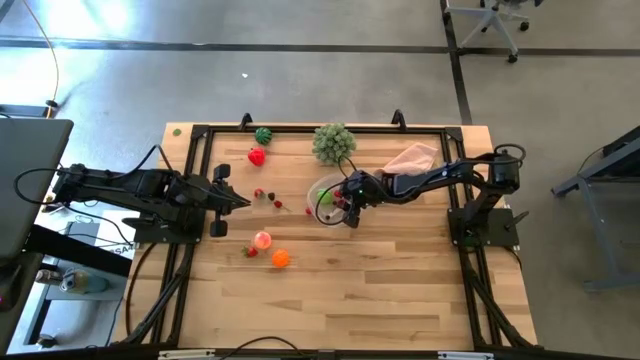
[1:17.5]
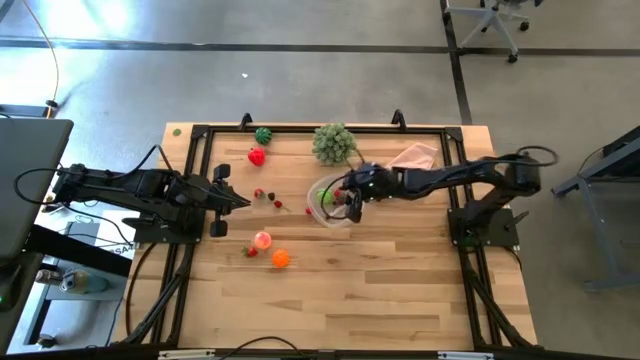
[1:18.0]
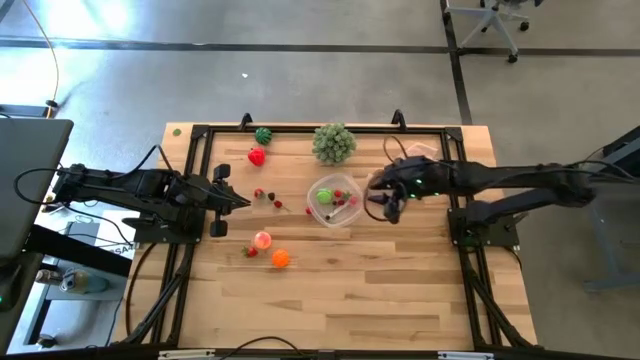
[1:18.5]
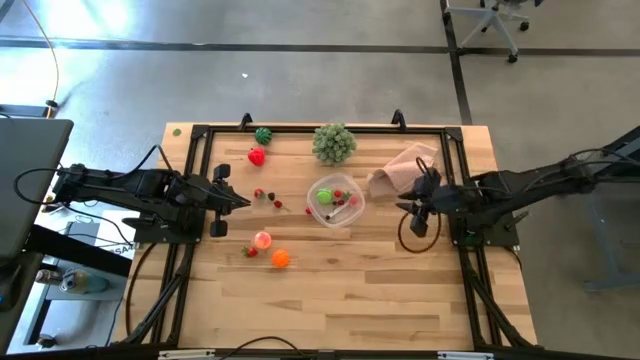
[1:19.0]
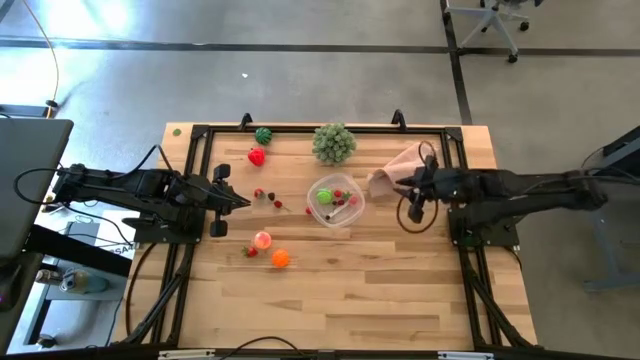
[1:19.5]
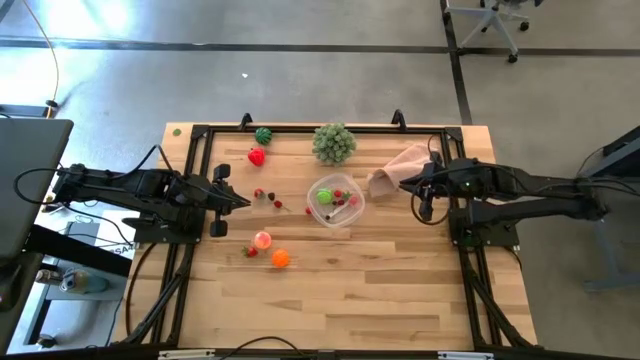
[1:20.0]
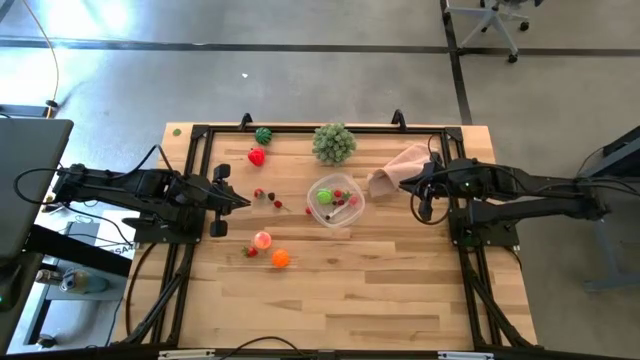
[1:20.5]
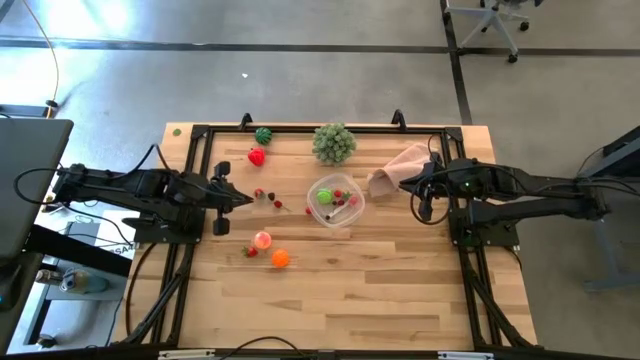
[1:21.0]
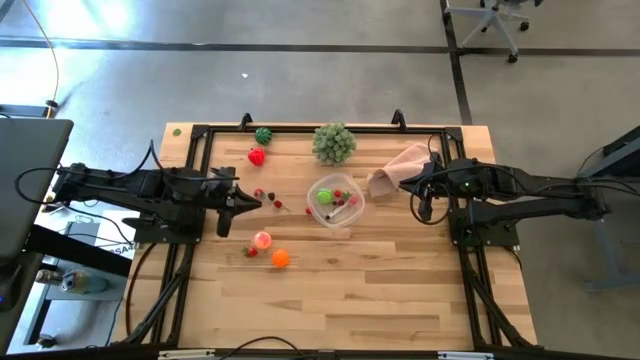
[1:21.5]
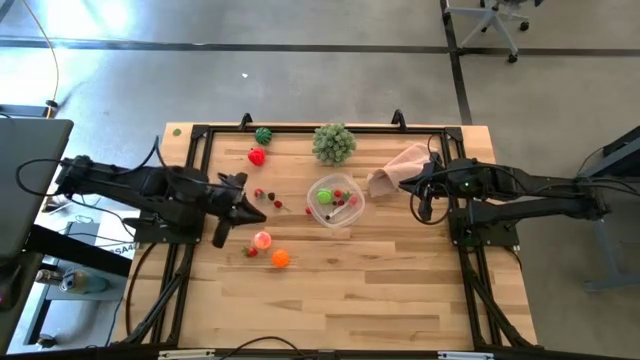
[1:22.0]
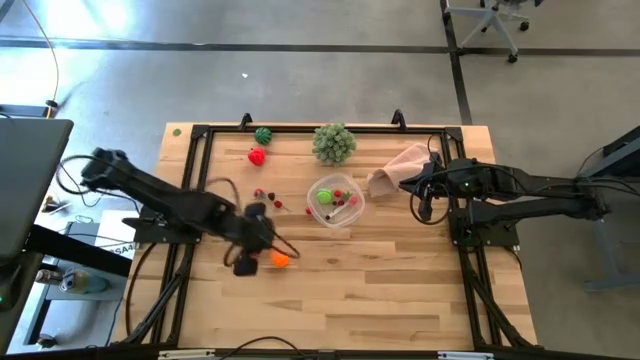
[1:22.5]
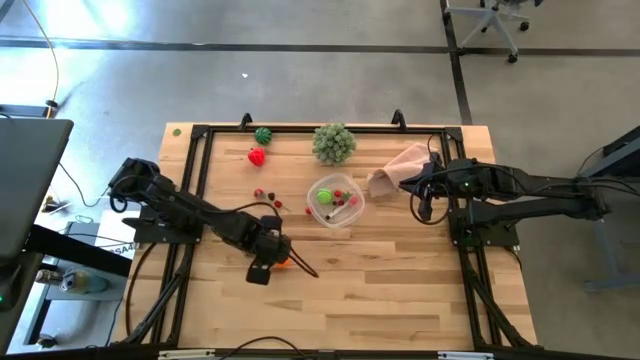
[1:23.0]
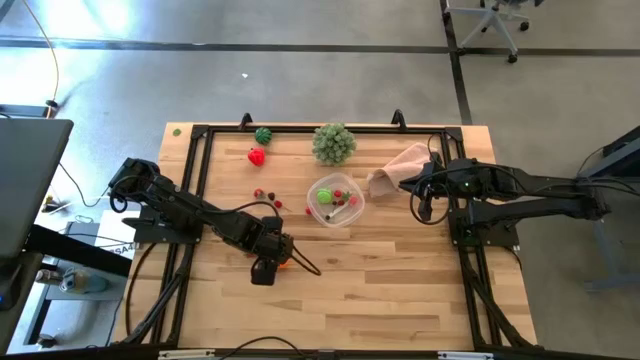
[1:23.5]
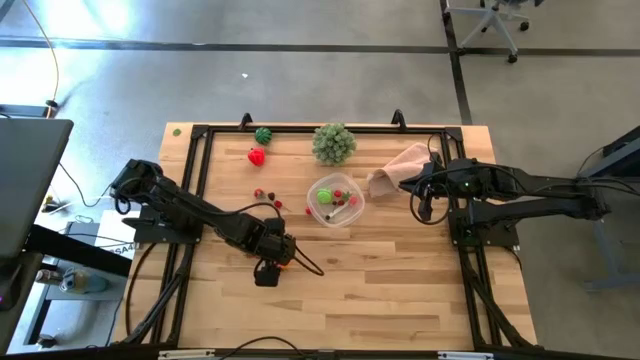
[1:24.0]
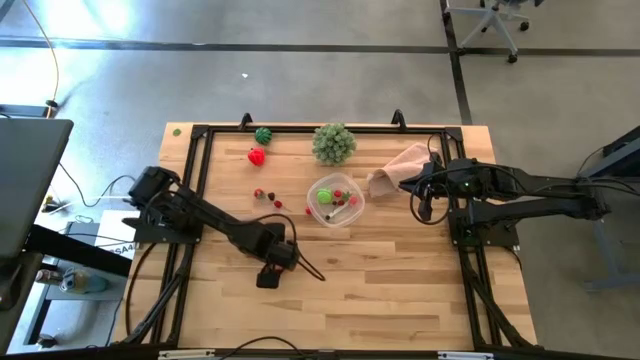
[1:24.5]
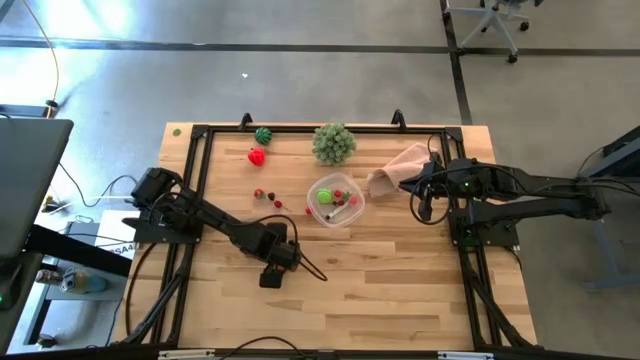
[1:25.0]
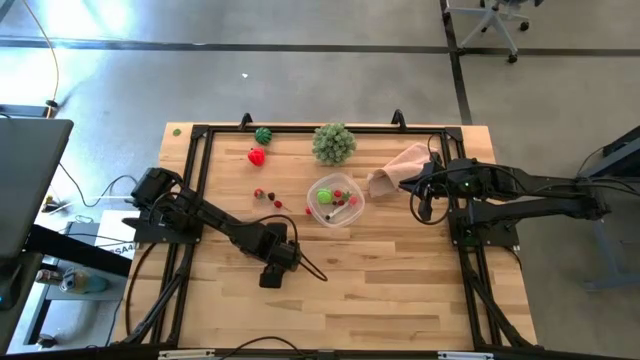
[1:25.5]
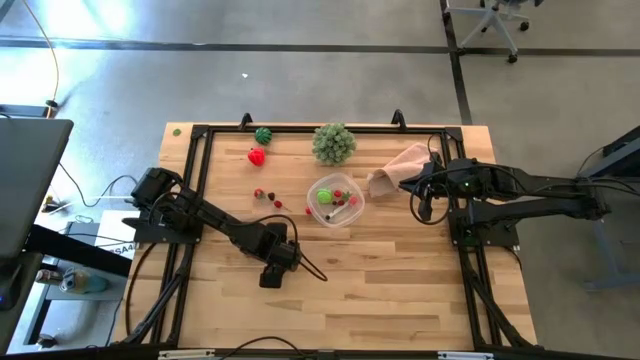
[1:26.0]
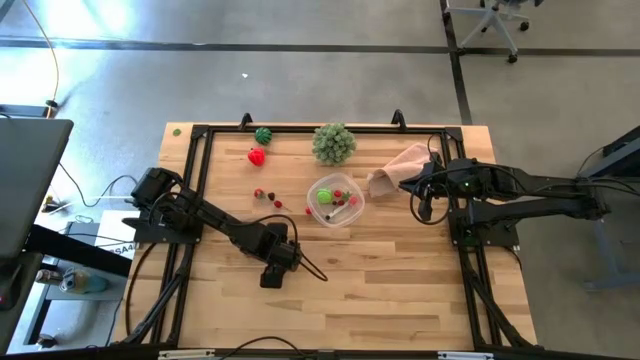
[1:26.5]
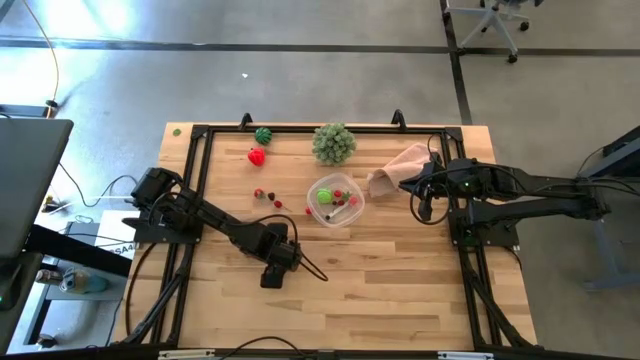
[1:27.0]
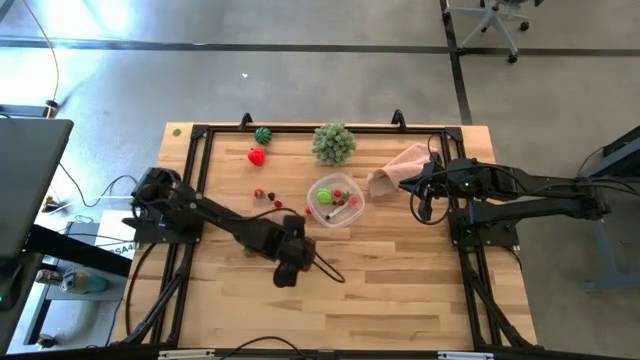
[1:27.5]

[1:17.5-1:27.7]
Task: Pick and placing Produce into tupperware
Put the pumpkin into the container

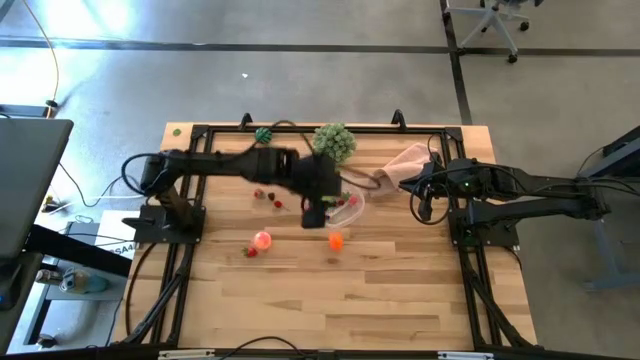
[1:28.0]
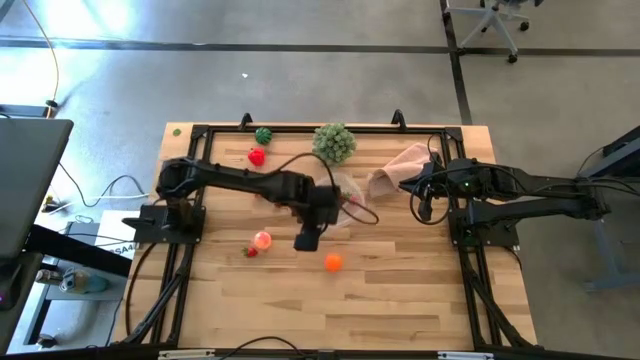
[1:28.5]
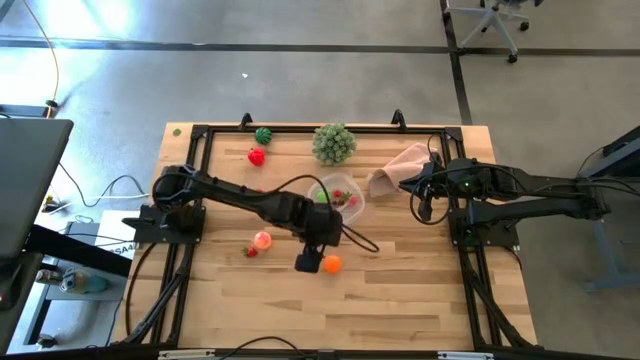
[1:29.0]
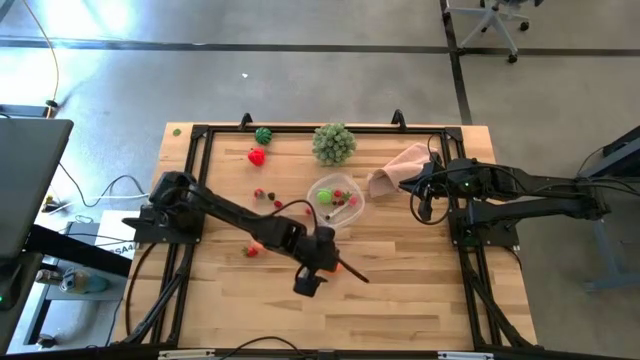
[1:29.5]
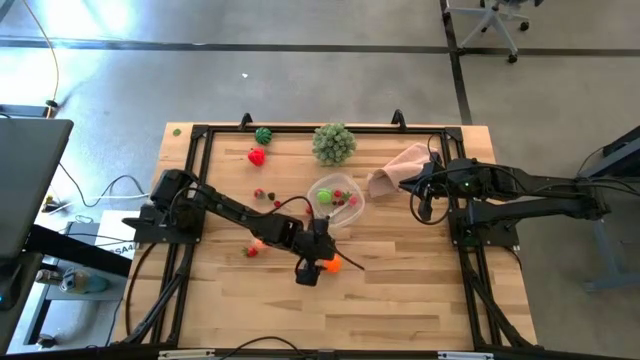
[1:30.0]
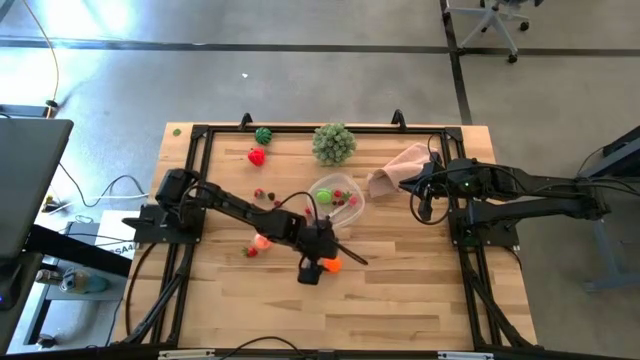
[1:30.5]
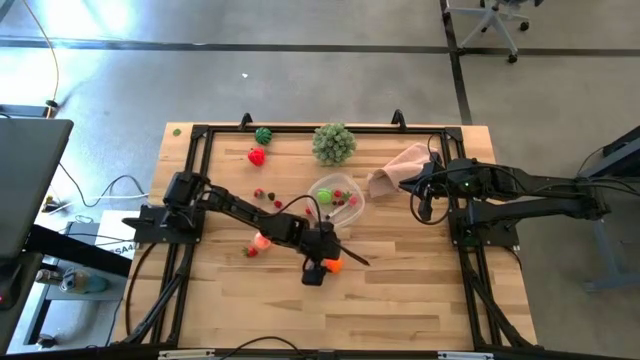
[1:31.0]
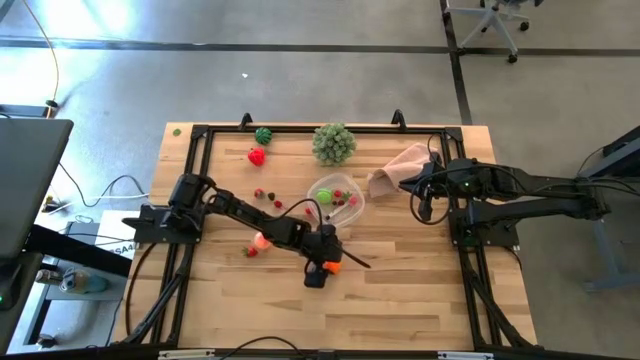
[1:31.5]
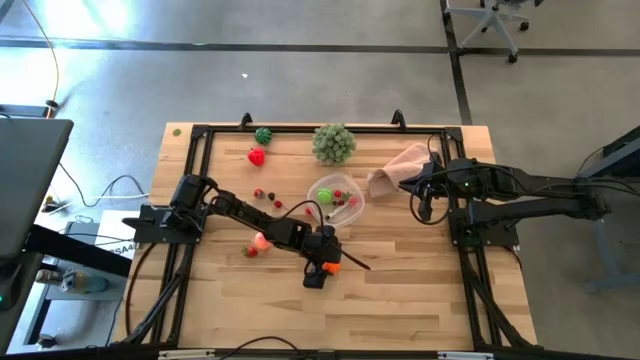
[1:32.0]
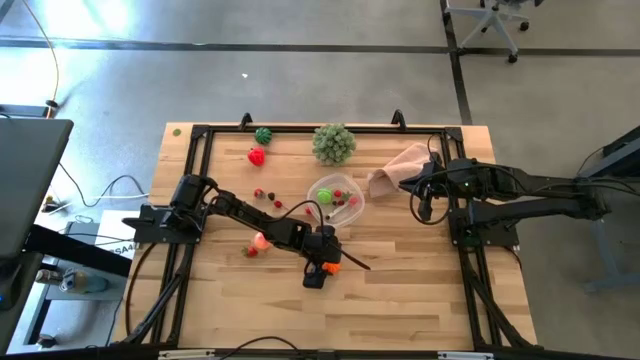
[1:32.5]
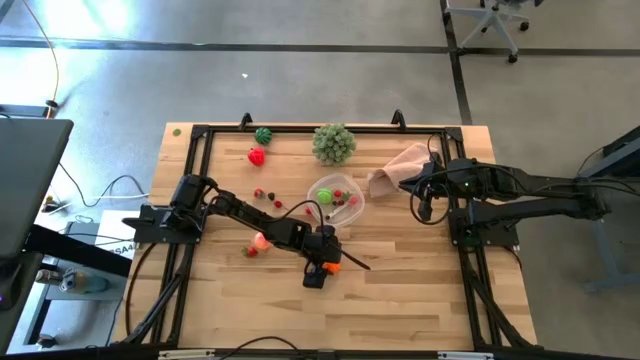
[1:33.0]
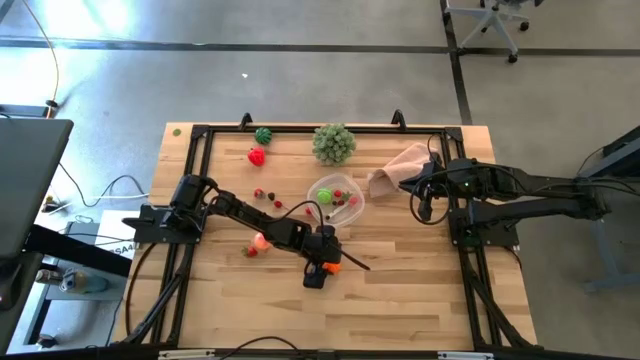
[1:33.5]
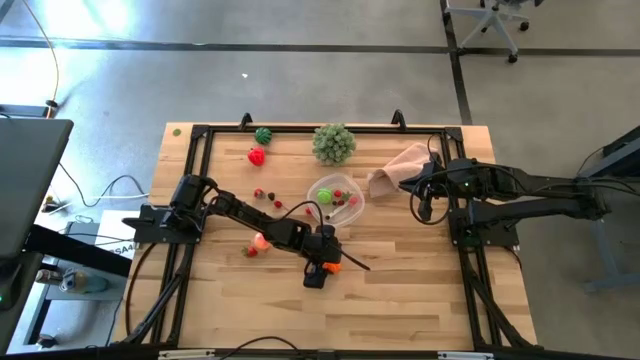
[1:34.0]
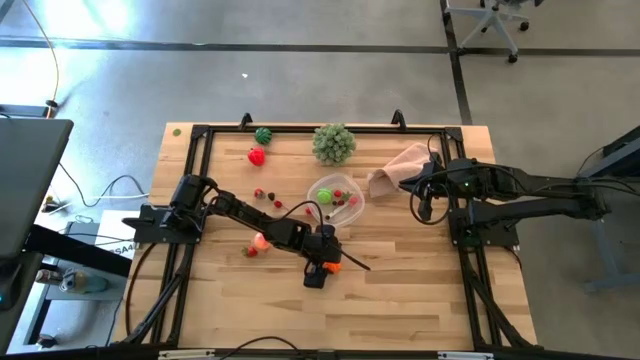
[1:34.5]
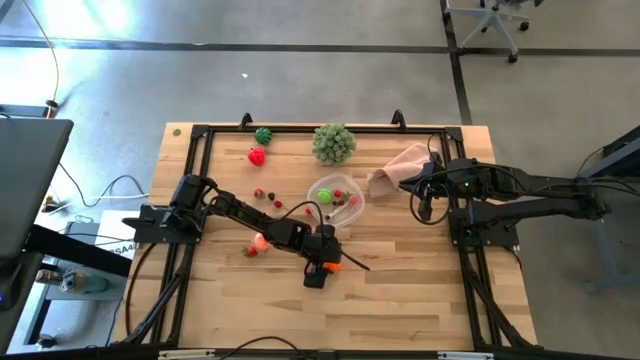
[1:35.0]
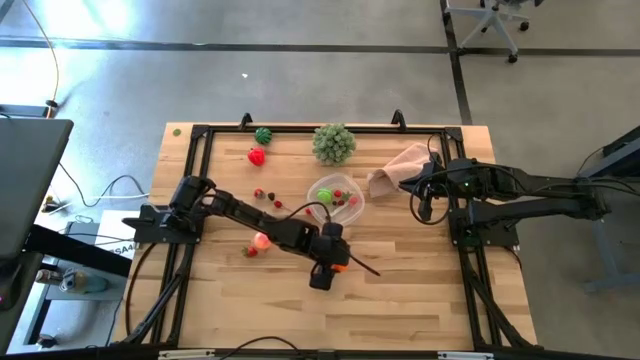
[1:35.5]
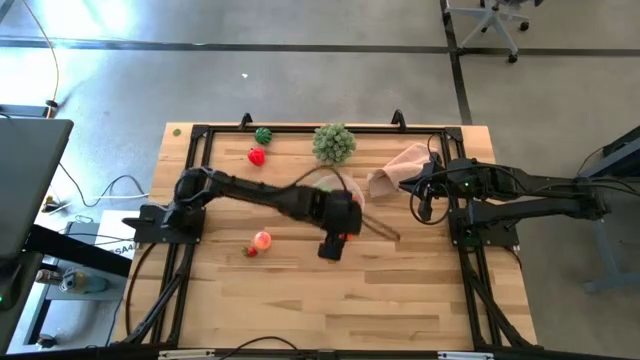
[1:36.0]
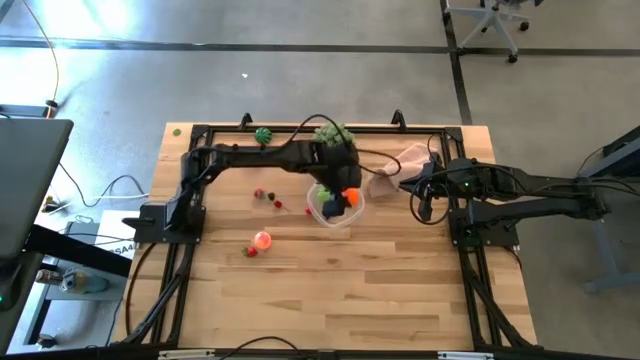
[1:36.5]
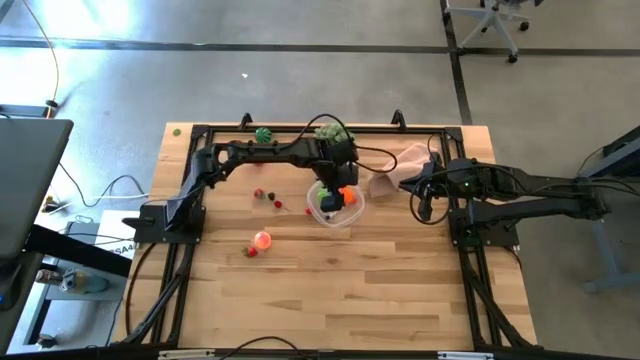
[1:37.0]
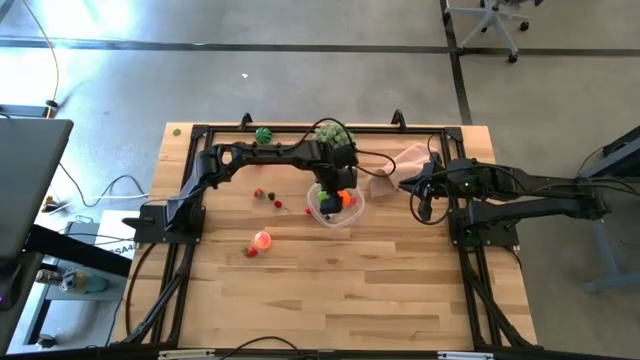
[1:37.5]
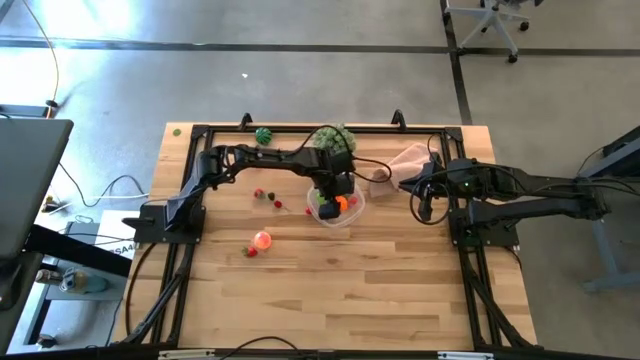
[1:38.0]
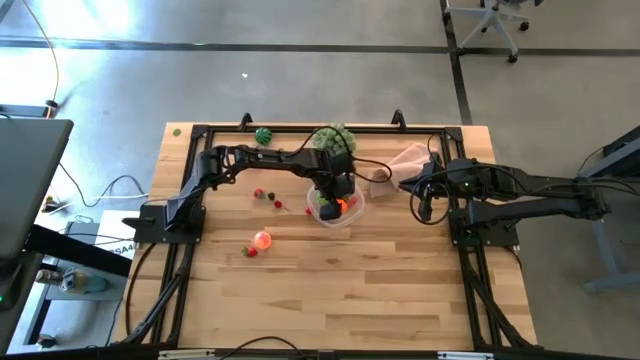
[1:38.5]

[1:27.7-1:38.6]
Put the pumpkin into the container
